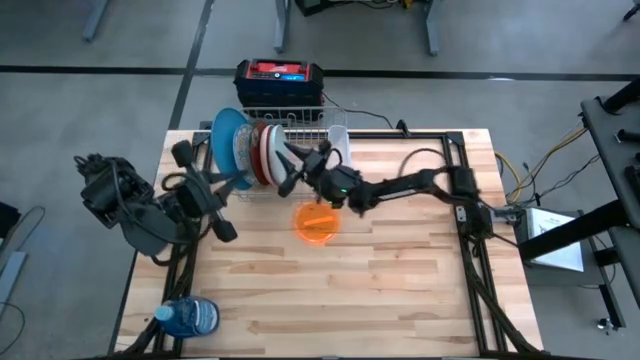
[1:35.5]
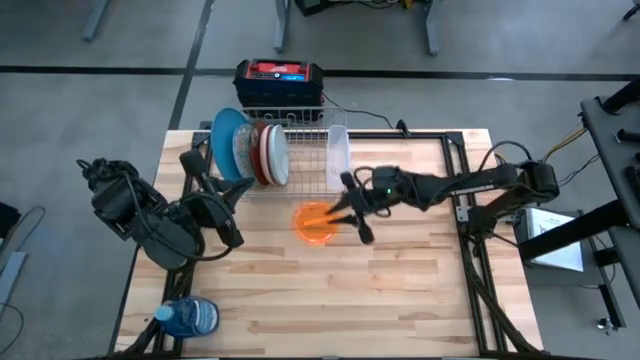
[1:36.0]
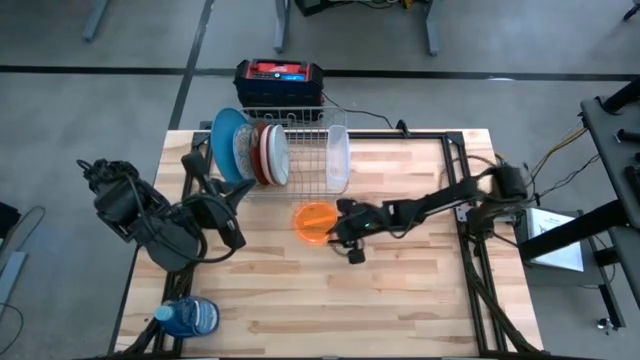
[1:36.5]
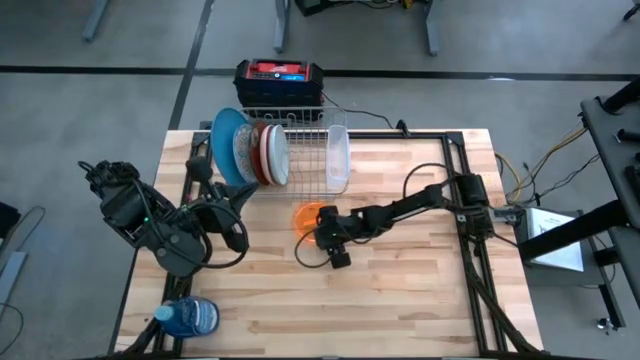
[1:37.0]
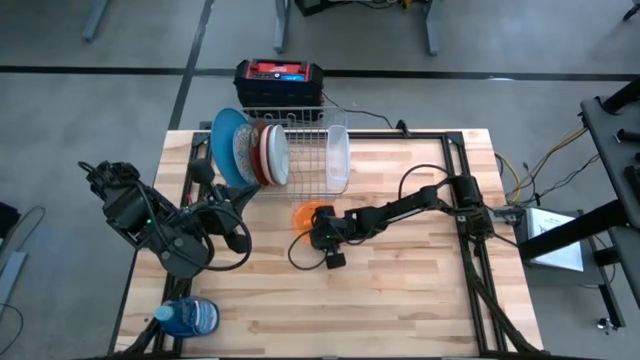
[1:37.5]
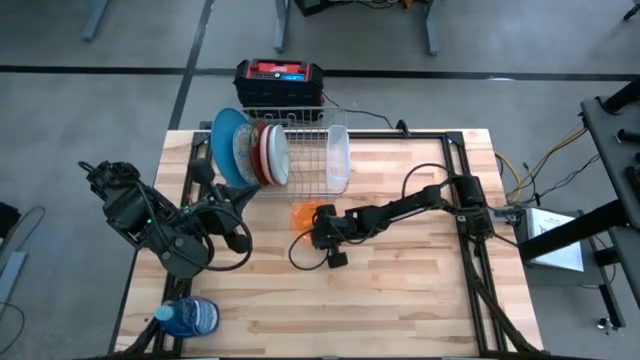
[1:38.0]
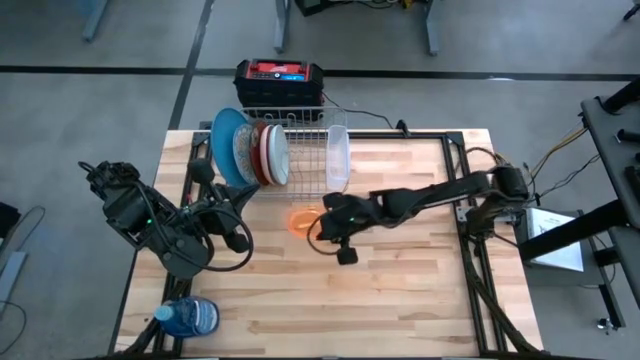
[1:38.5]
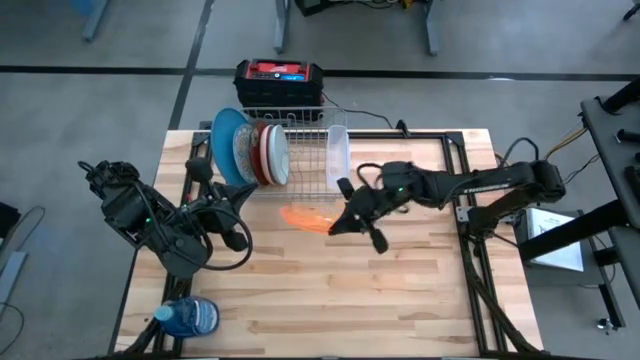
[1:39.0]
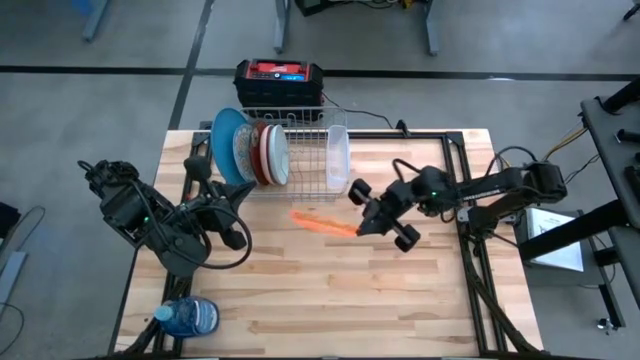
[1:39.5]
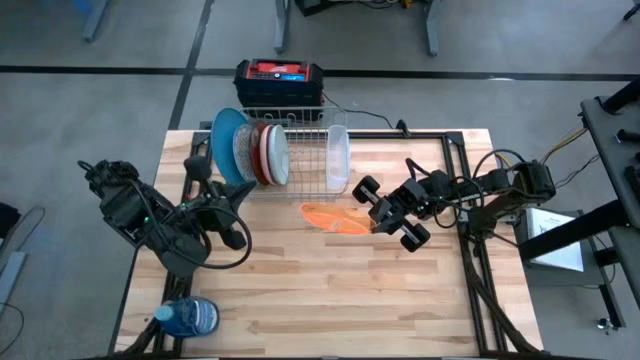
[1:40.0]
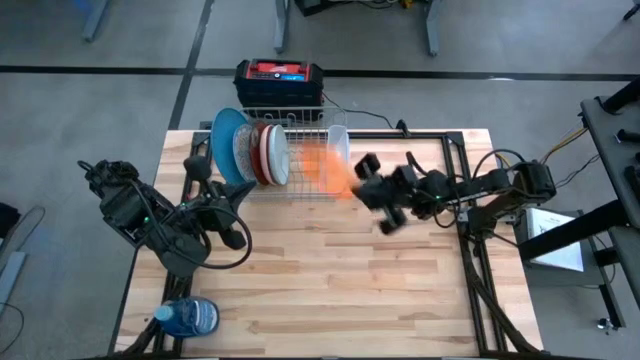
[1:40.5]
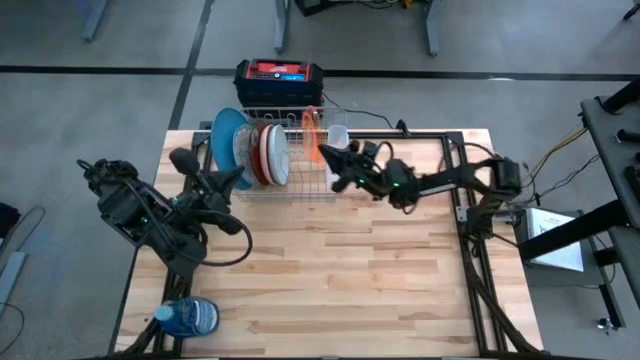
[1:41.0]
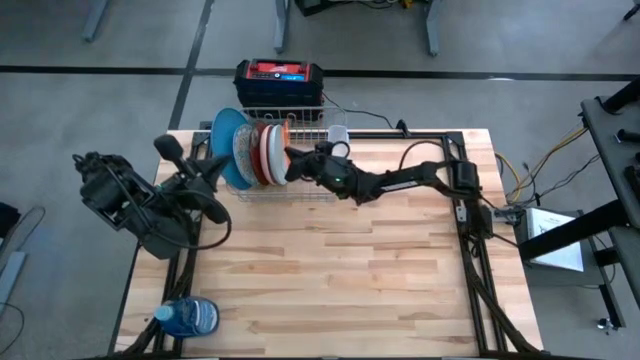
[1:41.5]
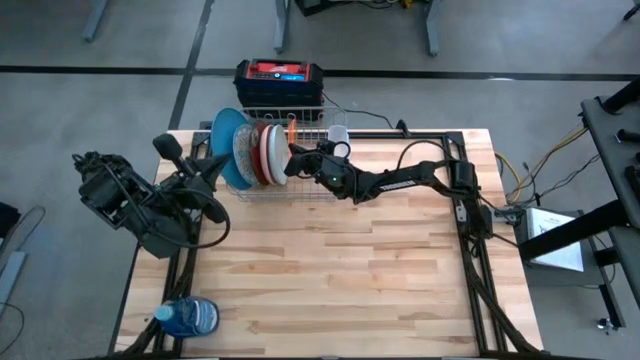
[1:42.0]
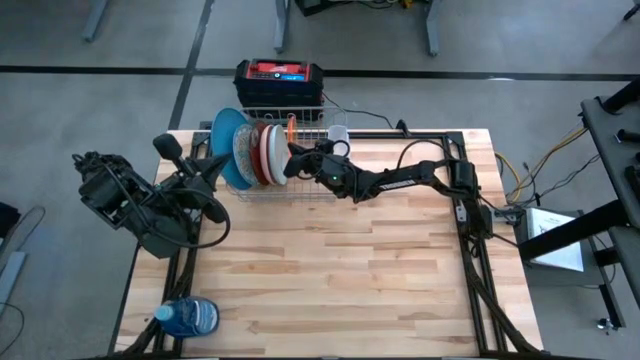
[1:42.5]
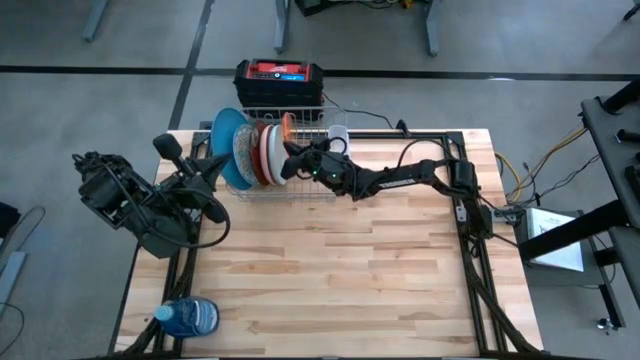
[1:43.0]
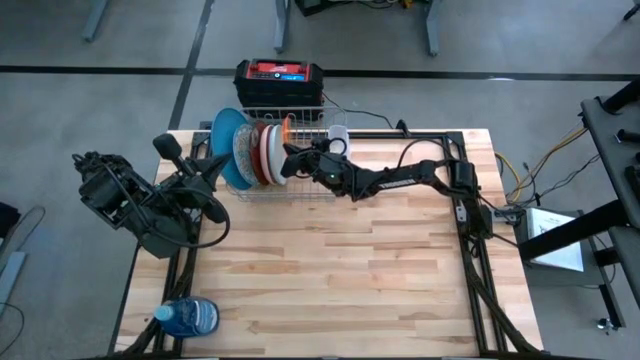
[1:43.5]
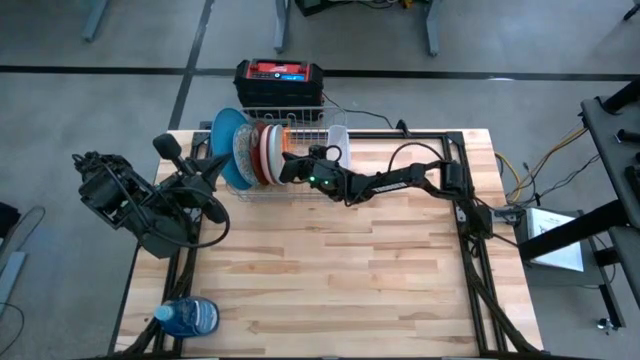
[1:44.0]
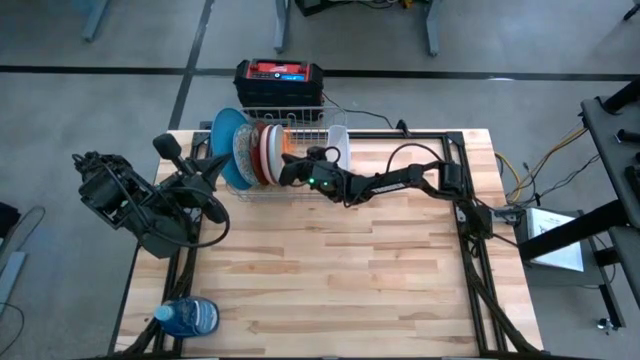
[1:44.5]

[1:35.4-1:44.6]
Task: Sort dishes
Put the orange plate in the dishwasher rack

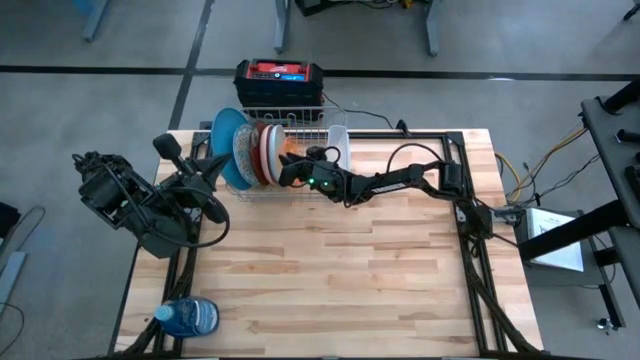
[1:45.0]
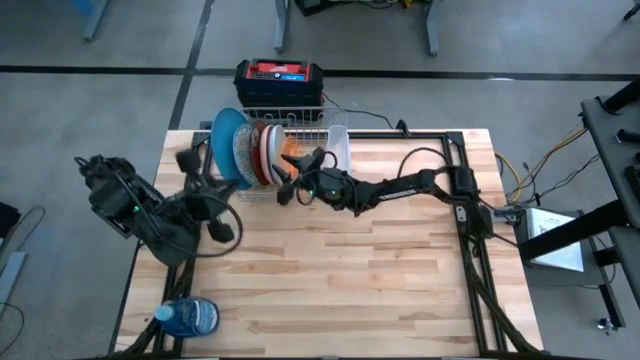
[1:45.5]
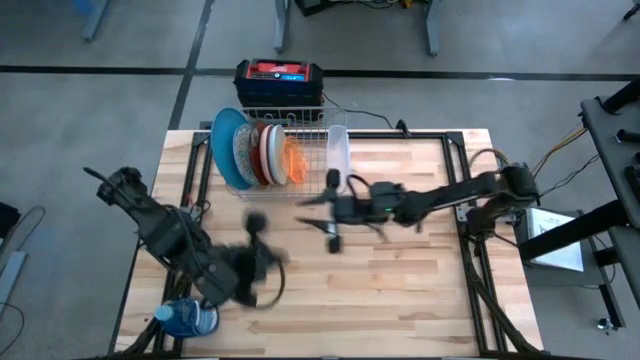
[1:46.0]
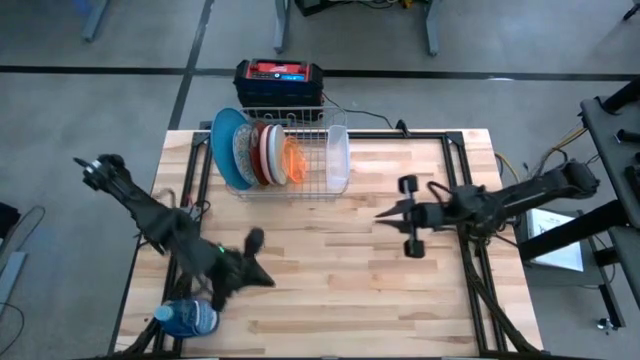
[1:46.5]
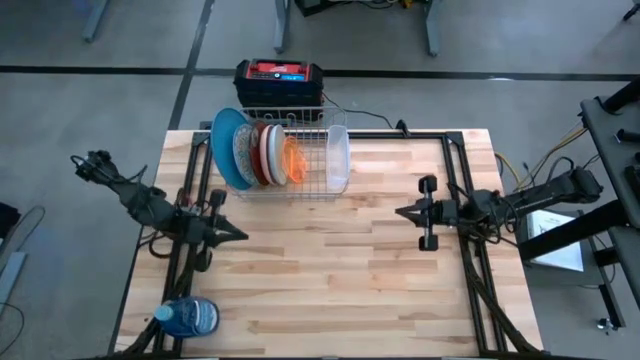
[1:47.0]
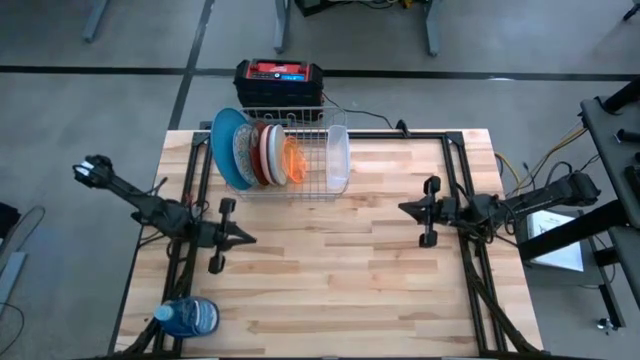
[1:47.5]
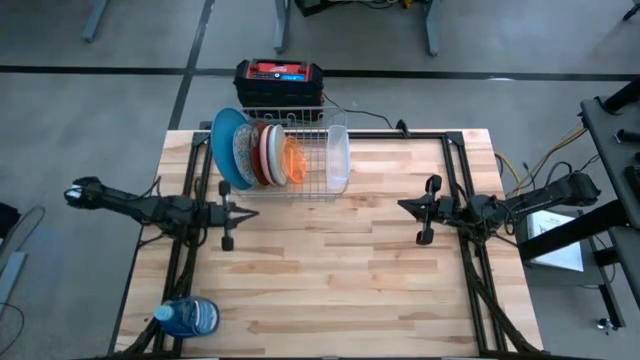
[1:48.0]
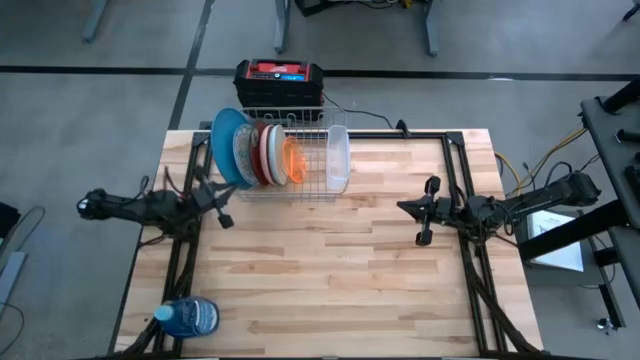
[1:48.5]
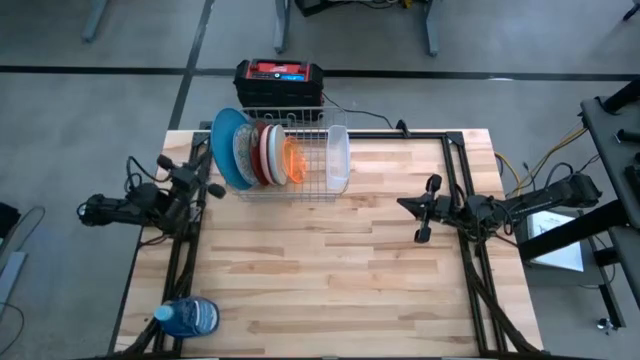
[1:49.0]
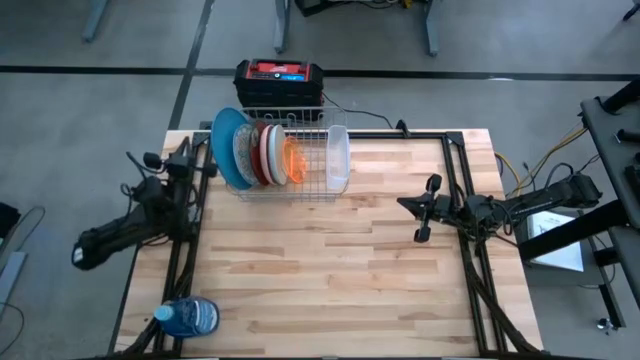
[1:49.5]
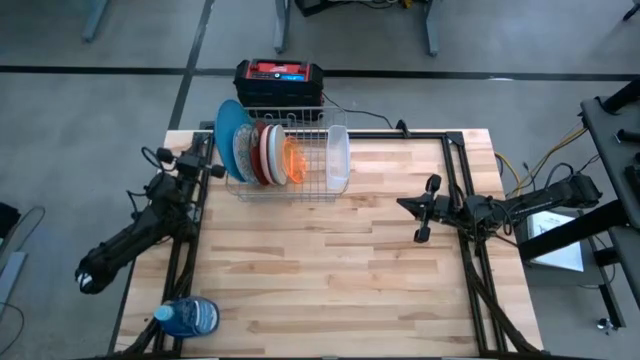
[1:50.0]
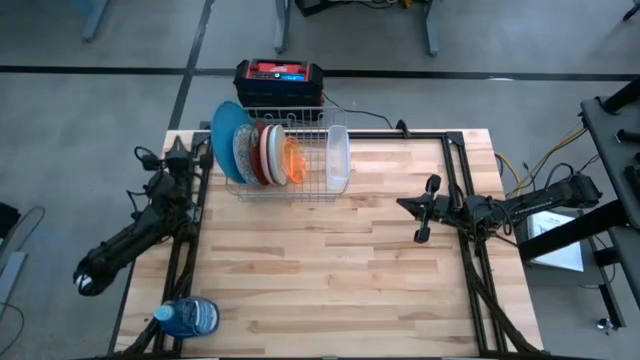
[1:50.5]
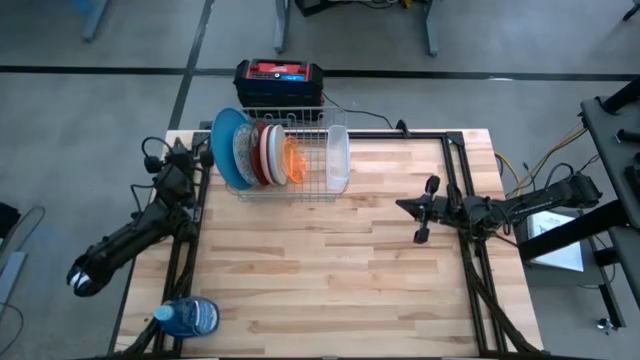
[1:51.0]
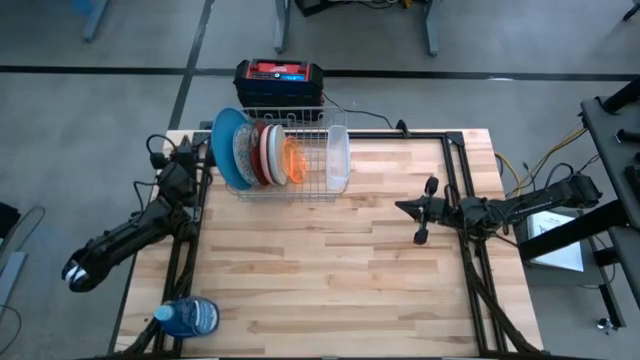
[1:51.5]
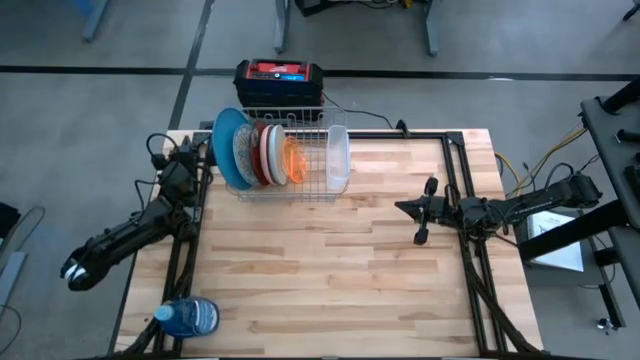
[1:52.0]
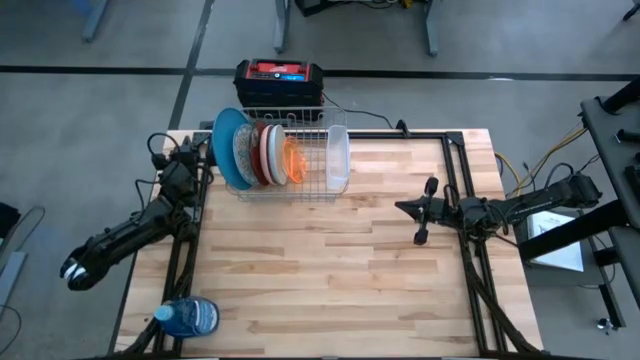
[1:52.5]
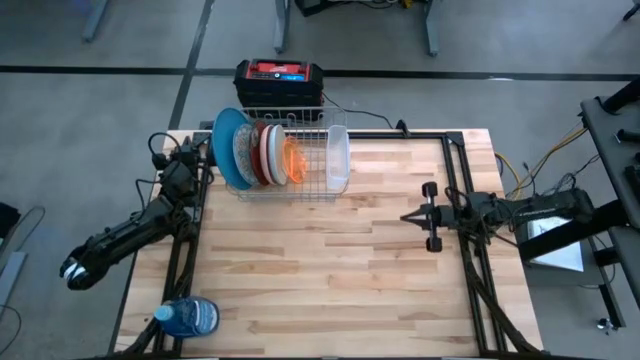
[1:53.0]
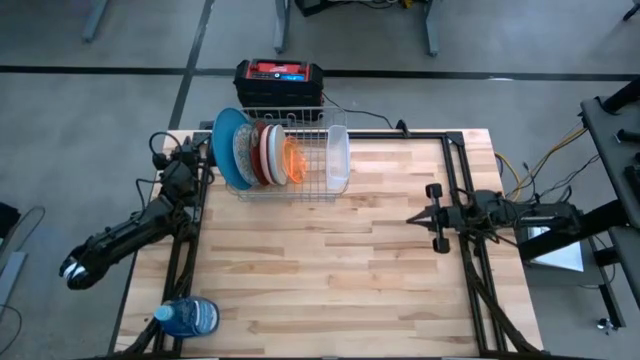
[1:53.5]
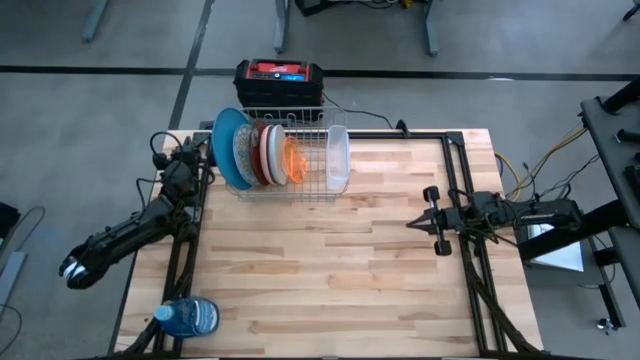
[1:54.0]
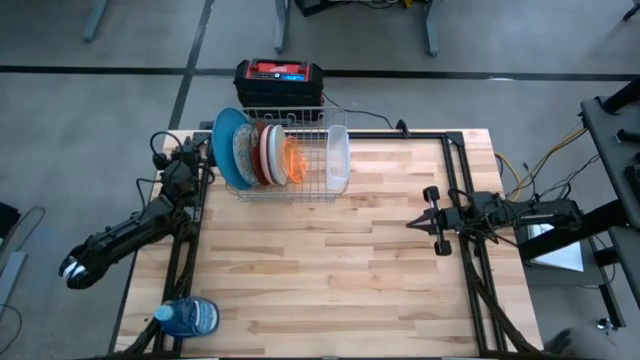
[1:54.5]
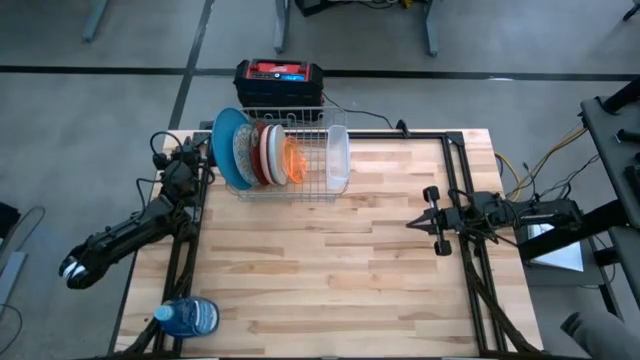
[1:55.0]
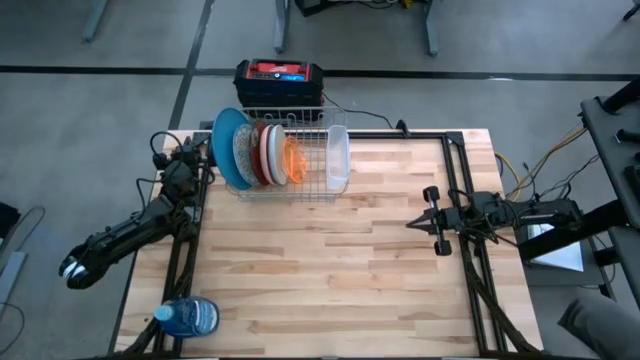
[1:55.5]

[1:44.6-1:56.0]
Return to Home Position

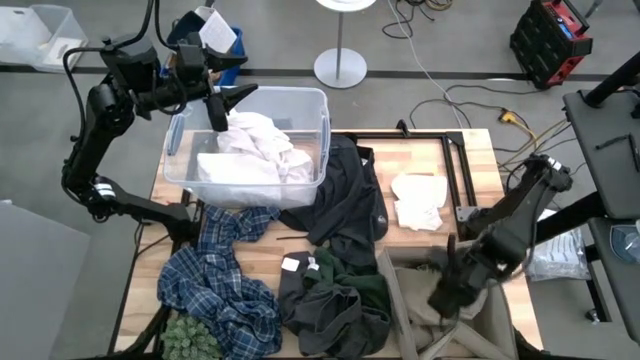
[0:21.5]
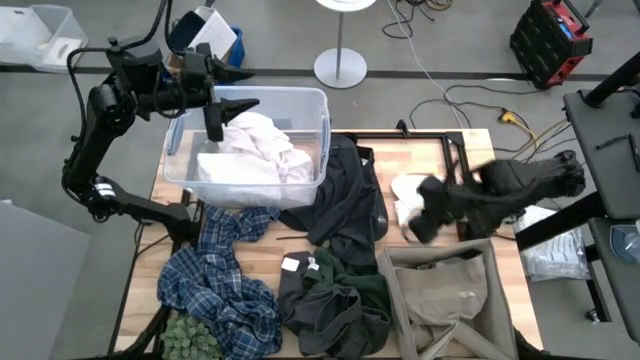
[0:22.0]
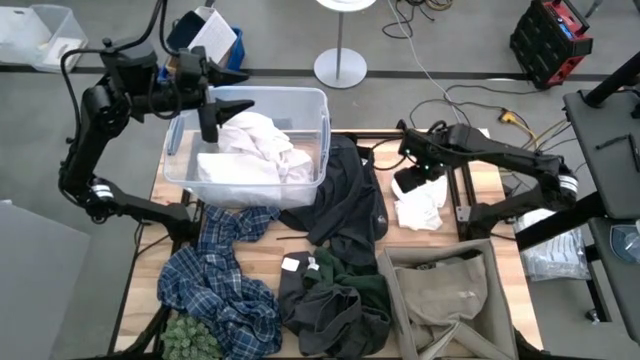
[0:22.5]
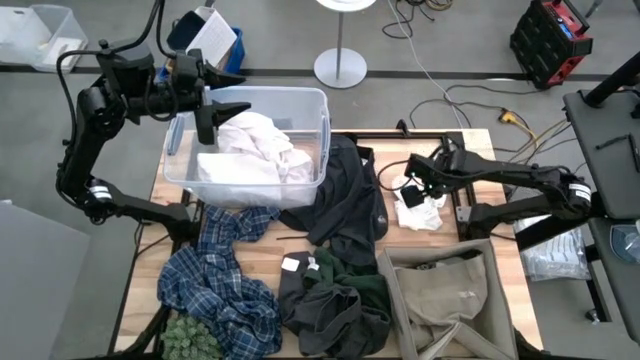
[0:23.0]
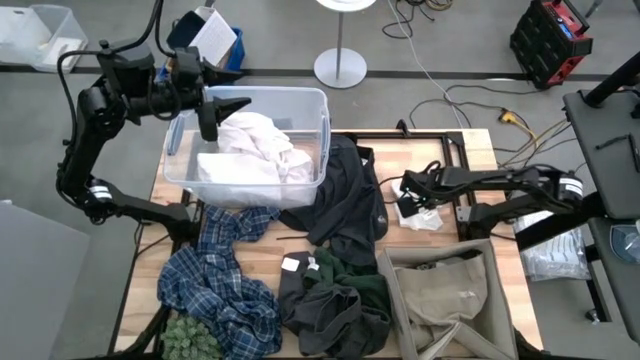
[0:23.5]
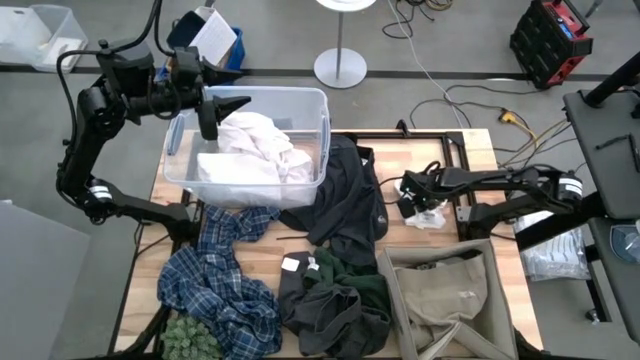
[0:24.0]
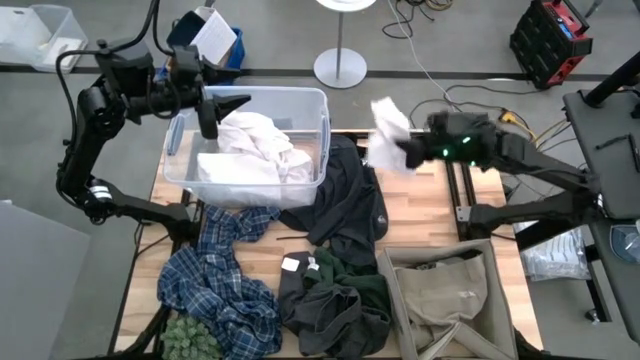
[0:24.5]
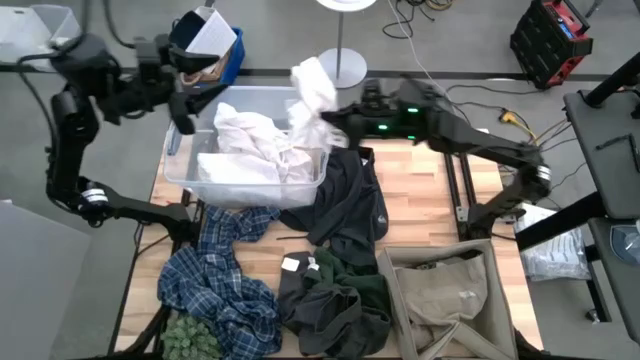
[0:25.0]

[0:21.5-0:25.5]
Task: Sort clothes
Put the white shorts into the transparent bin
